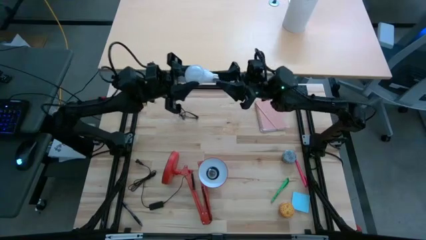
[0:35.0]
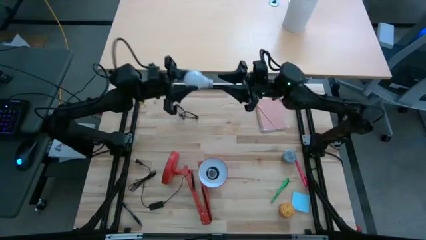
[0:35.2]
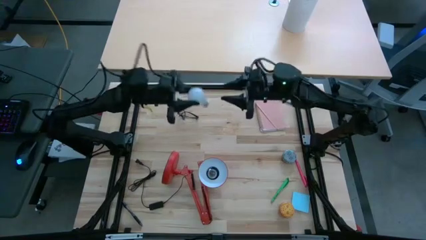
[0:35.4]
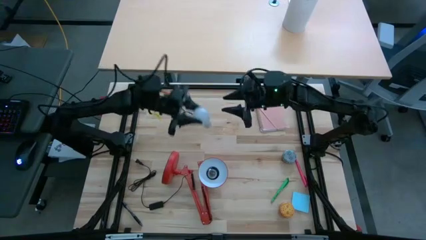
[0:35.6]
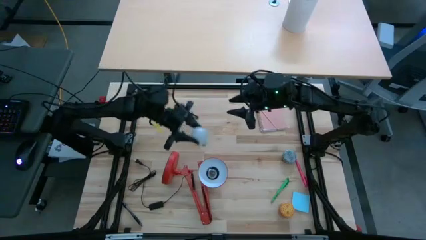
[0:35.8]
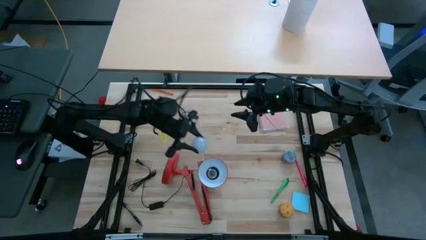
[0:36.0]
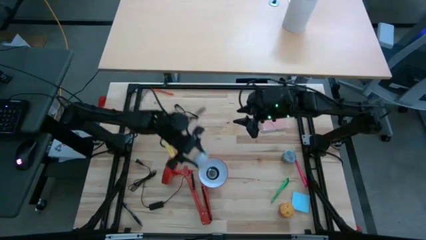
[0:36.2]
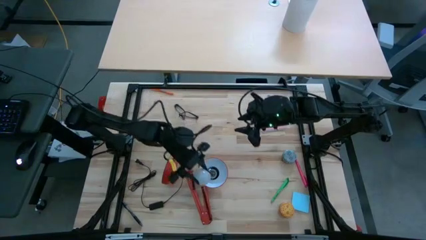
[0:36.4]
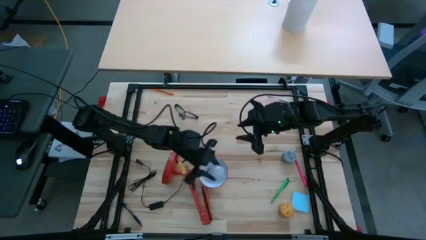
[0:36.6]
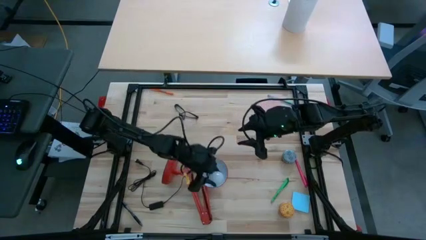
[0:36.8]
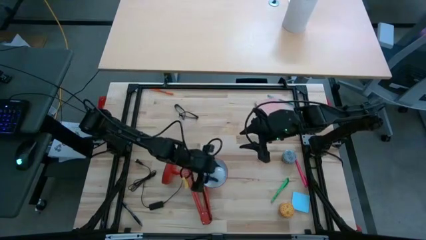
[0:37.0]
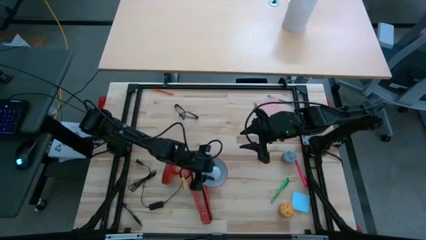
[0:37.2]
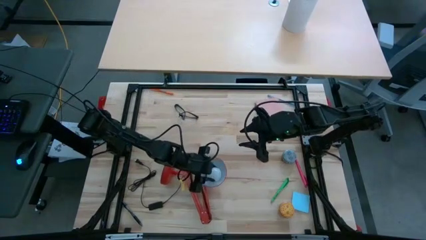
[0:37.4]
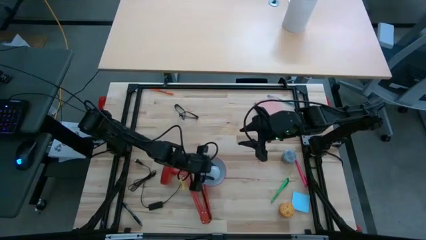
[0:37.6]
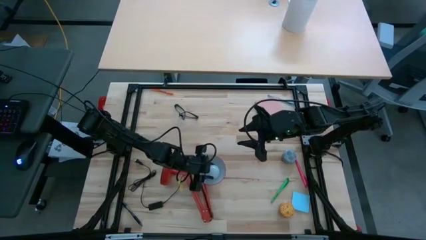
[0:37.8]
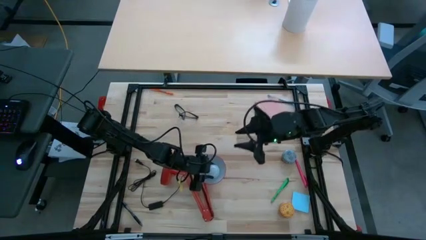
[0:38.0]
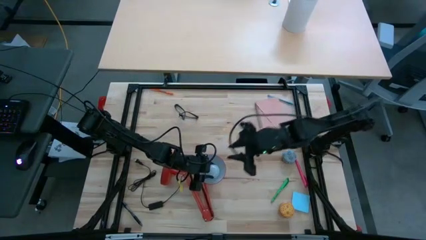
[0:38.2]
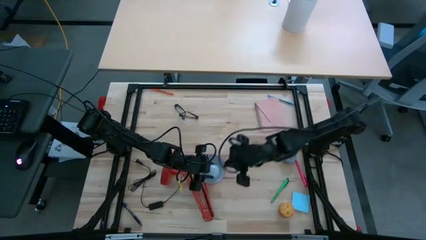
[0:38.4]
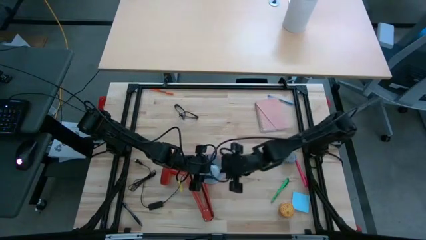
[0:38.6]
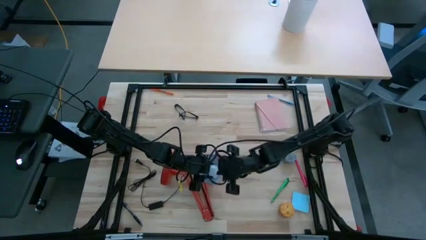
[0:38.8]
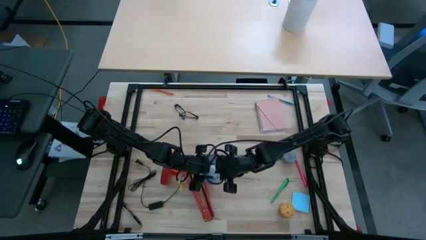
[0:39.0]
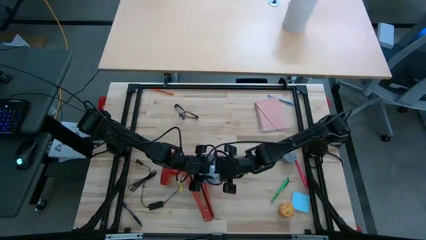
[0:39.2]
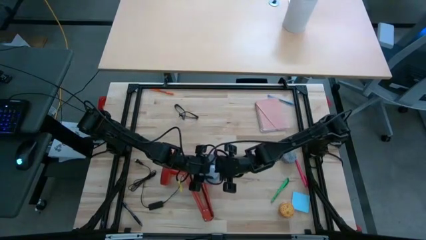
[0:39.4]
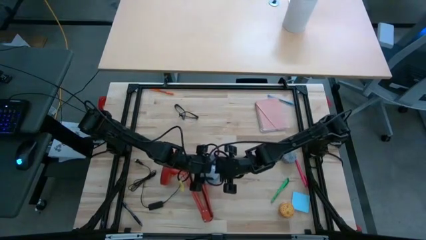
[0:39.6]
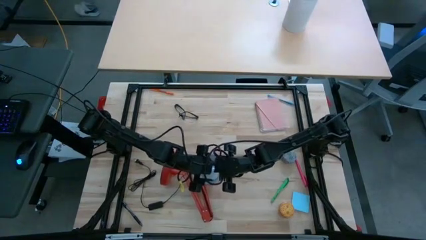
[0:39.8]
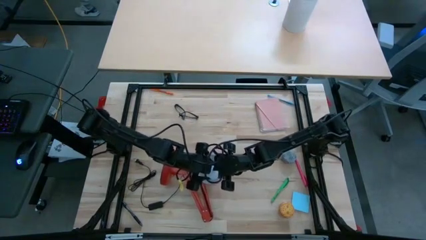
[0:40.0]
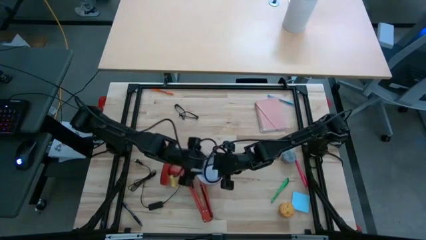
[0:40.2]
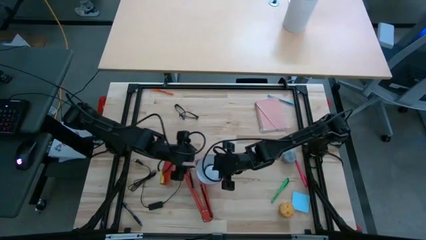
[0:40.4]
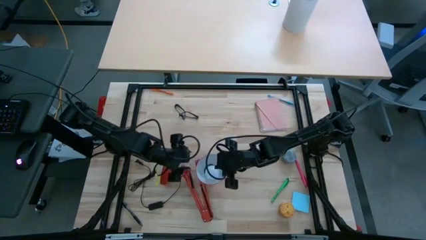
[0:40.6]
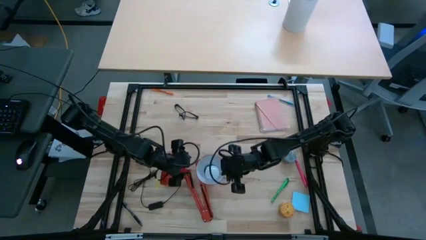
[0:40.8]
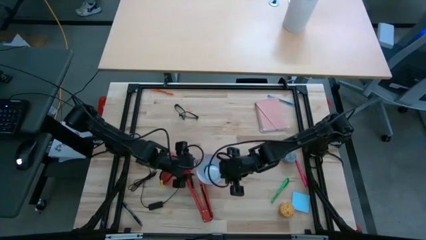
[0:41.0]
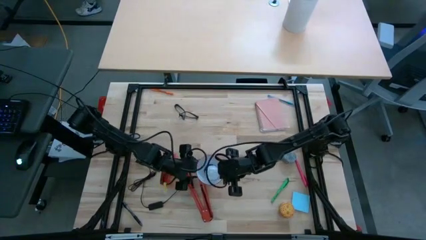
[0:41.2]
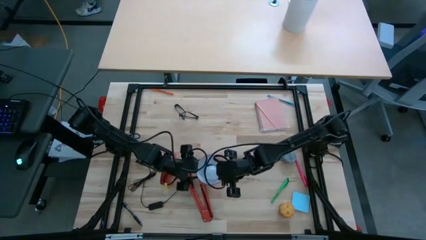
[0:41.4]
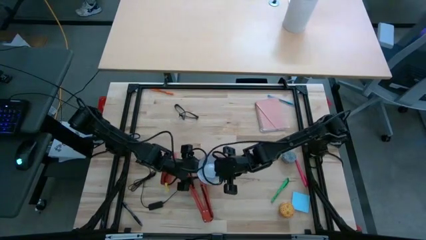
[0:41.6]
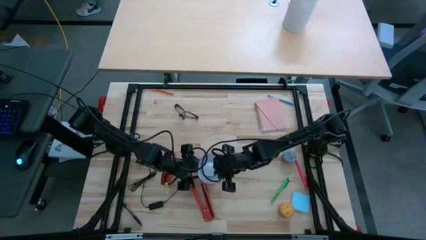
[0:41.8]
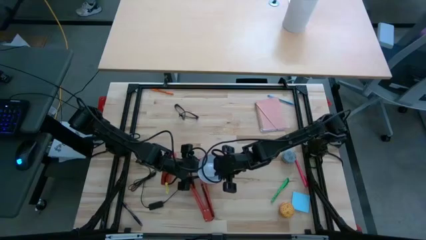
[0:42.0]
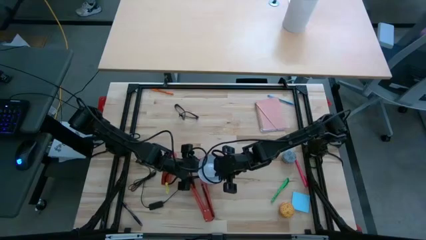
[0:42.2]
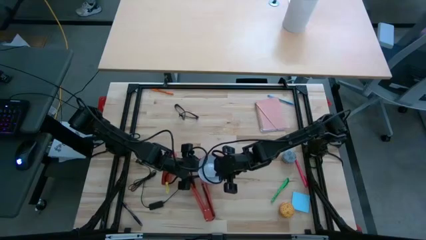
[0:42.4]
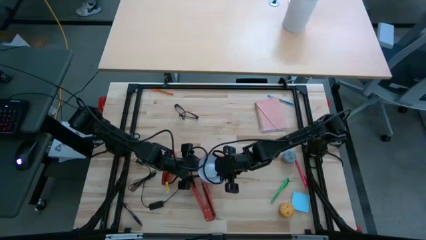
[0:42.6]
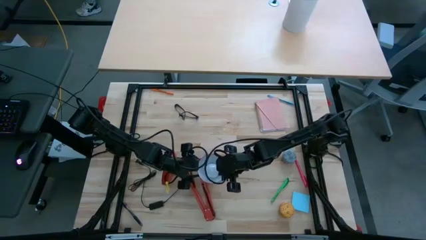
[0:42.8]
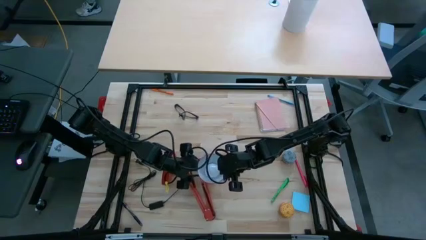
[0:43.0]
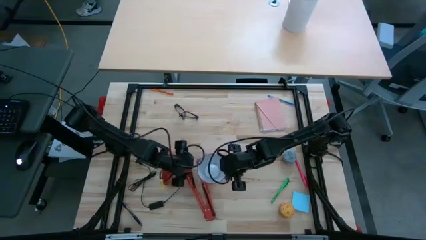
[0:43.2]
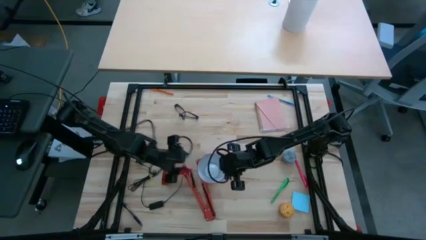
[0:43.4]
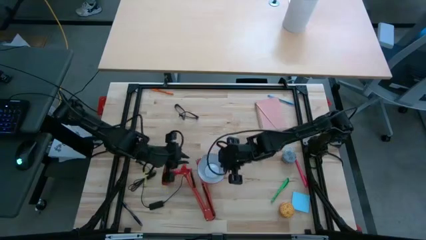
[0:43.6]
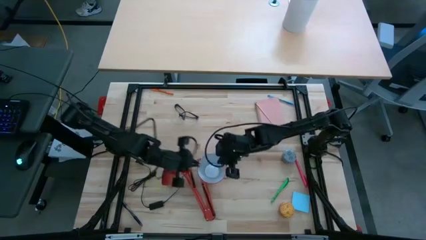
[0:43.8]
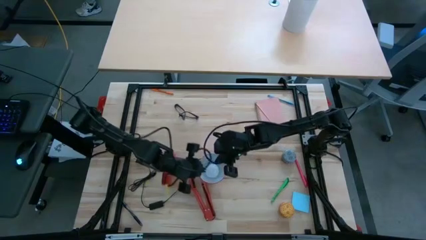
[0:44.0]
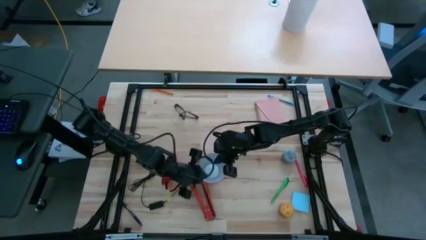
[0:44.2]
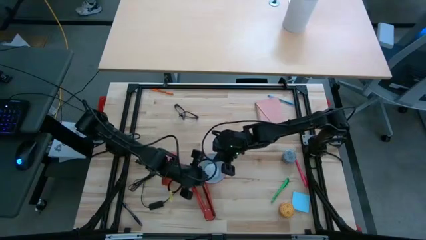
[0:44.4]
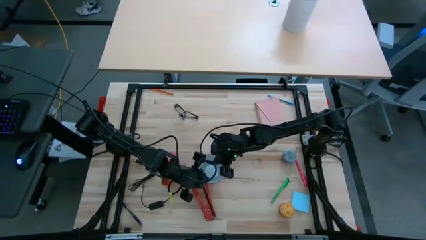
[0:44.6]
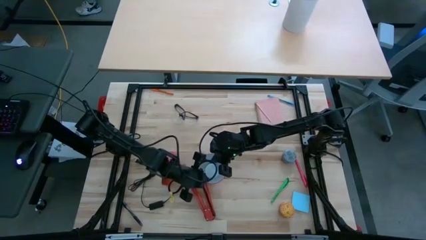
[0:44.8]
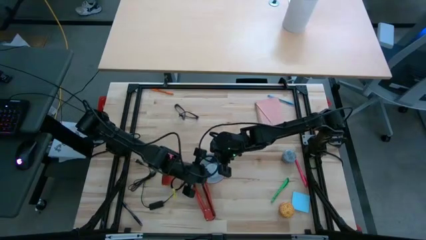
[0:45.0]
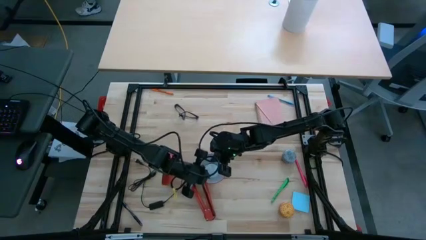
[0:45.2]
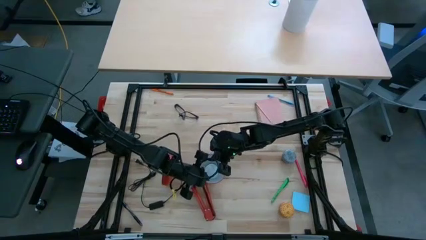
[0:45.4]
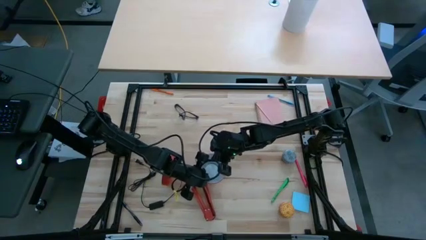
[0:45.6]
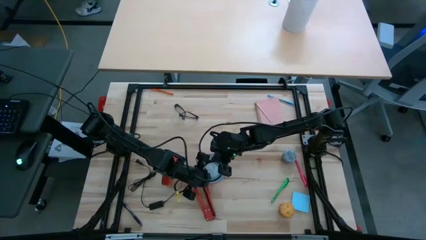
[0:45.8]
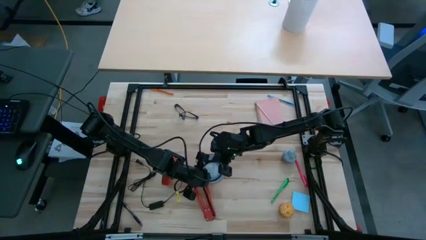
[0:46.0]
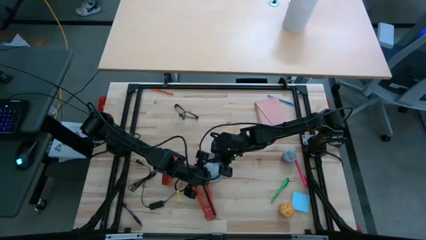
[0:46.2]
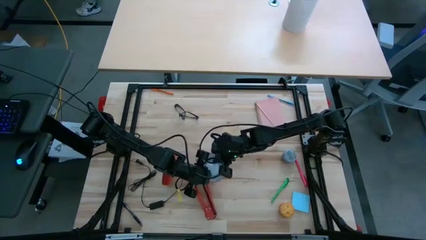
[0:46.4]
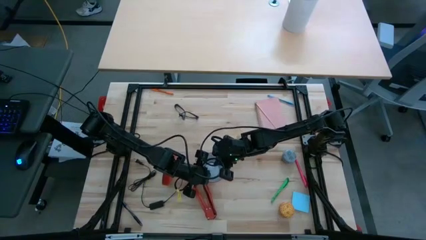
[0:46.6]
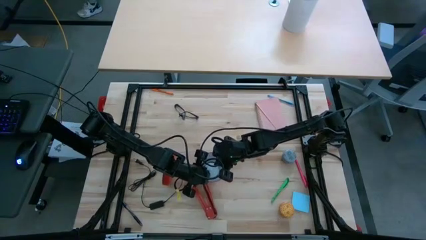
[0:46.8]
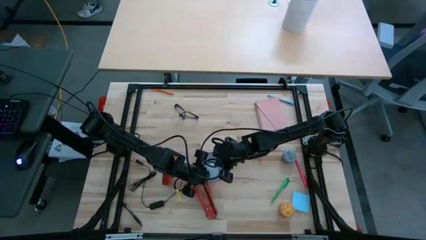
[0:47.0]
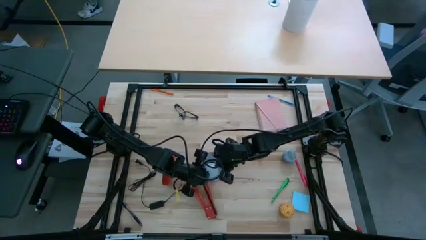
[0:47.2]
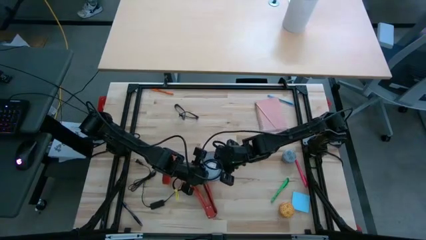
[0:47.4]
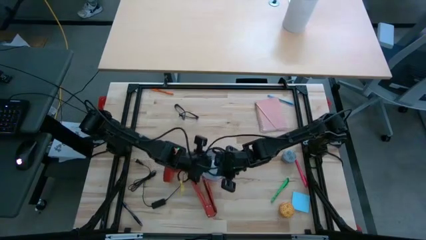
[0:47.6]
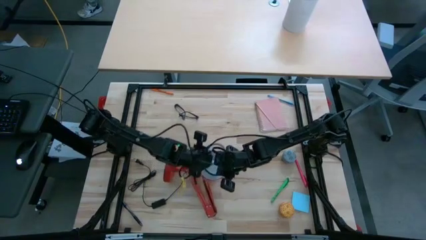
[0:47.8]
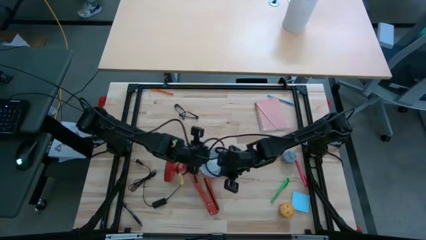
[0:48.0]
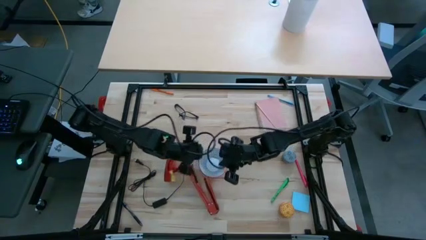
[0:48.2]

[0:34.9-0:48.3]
Task: Screw lightbulb
Insert the lightbulb into the lamp
